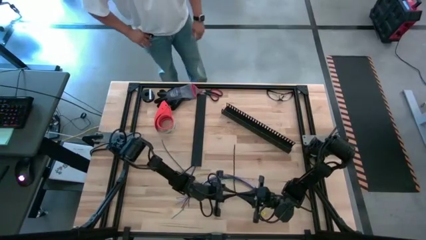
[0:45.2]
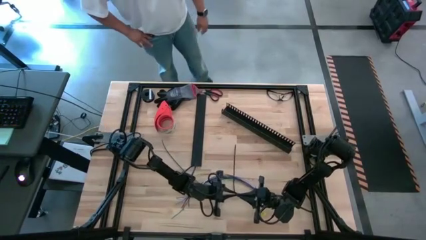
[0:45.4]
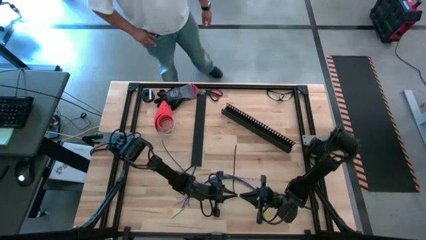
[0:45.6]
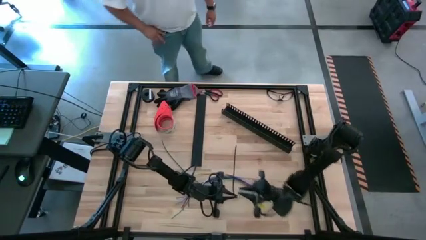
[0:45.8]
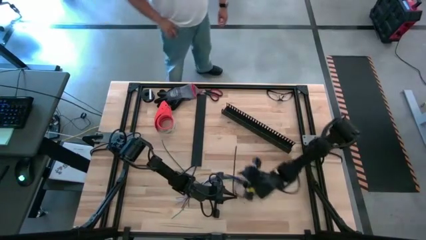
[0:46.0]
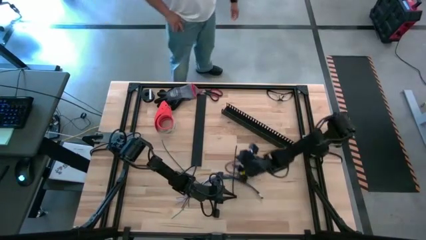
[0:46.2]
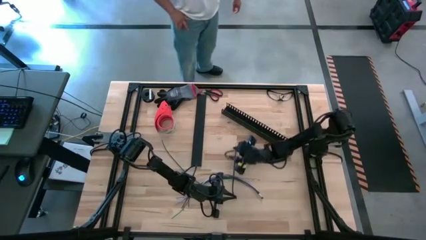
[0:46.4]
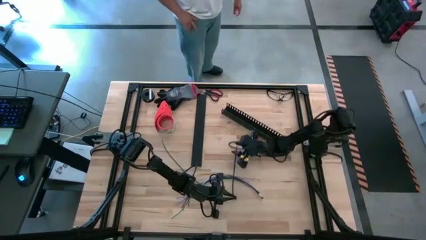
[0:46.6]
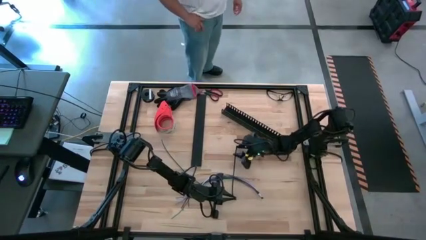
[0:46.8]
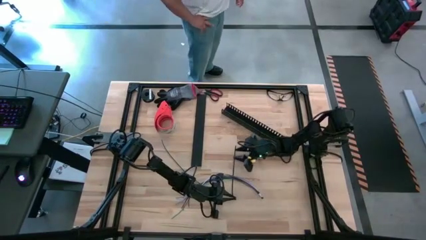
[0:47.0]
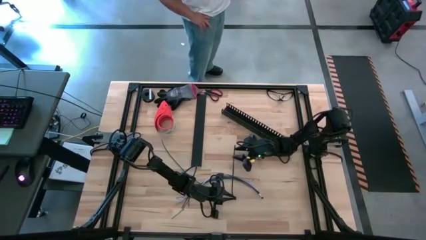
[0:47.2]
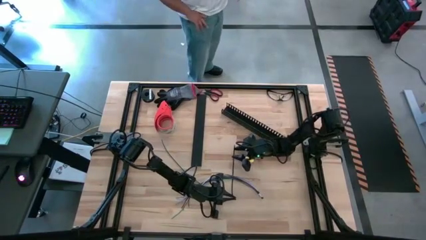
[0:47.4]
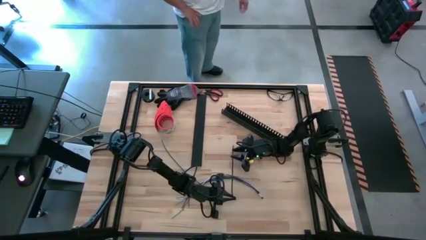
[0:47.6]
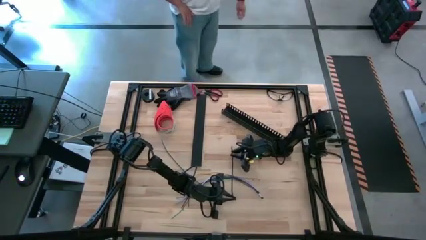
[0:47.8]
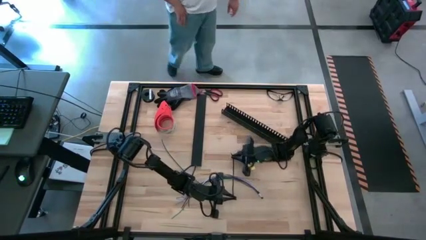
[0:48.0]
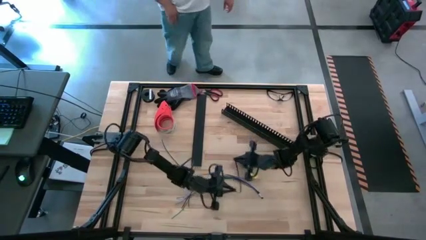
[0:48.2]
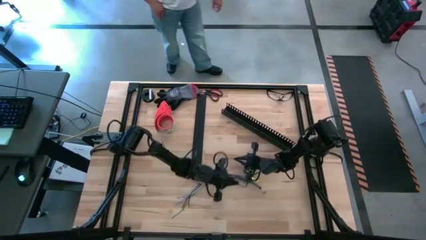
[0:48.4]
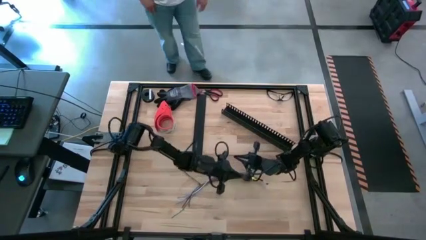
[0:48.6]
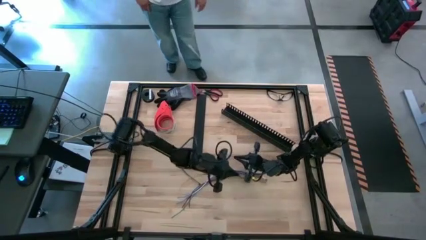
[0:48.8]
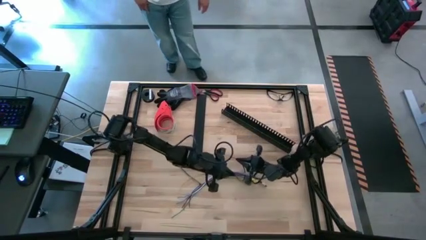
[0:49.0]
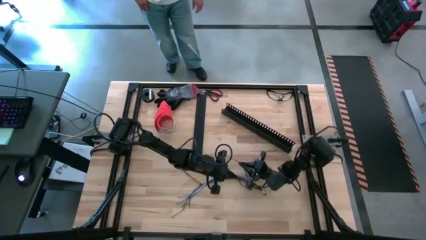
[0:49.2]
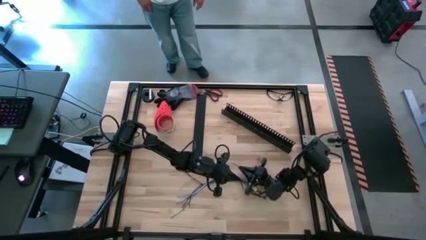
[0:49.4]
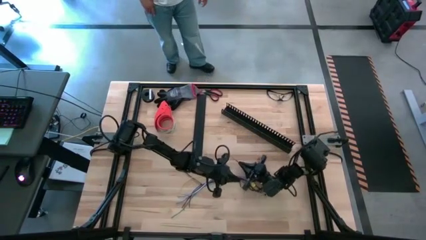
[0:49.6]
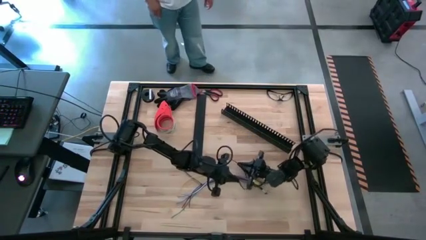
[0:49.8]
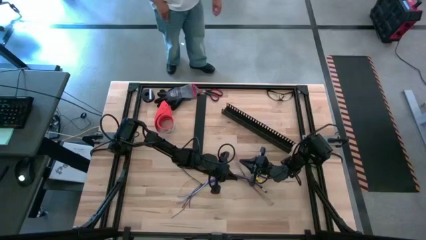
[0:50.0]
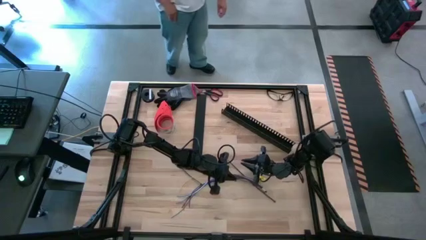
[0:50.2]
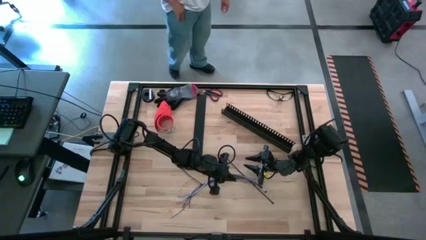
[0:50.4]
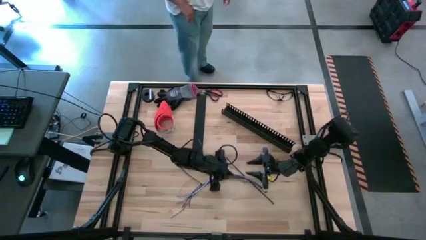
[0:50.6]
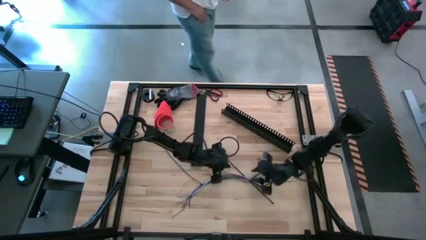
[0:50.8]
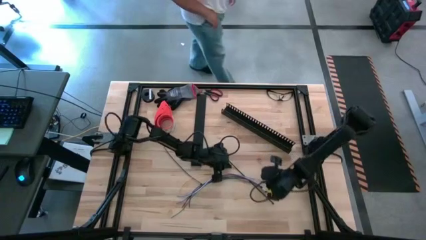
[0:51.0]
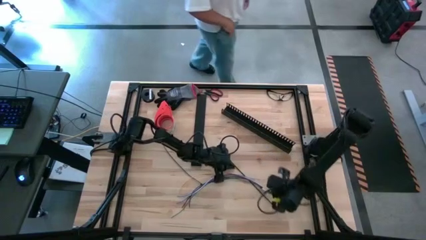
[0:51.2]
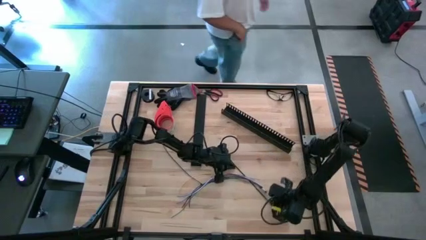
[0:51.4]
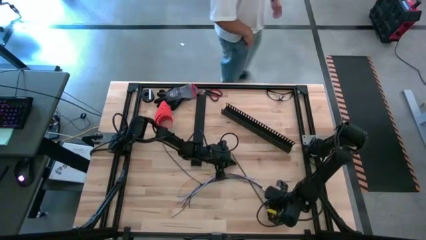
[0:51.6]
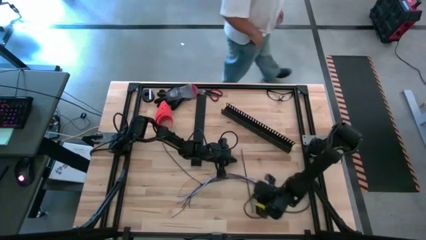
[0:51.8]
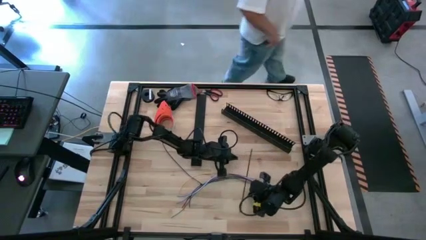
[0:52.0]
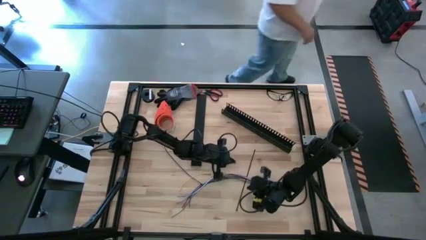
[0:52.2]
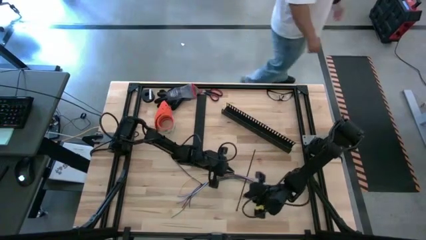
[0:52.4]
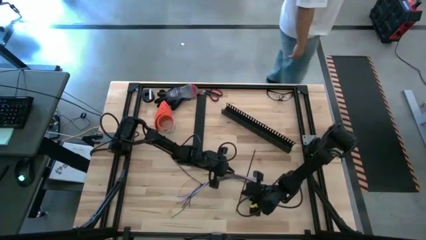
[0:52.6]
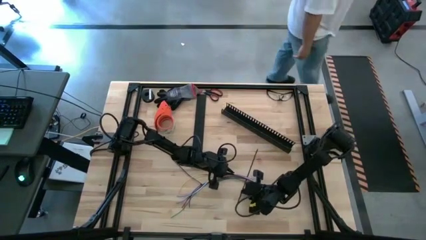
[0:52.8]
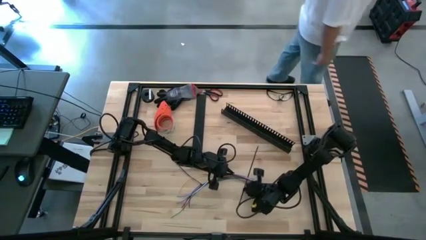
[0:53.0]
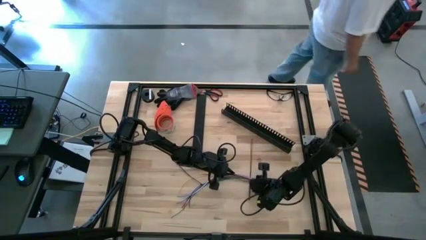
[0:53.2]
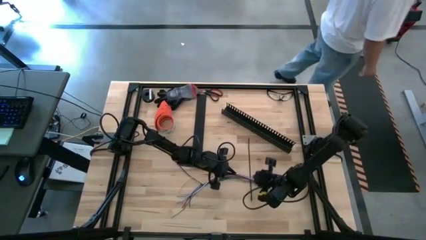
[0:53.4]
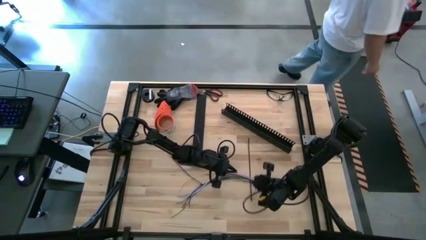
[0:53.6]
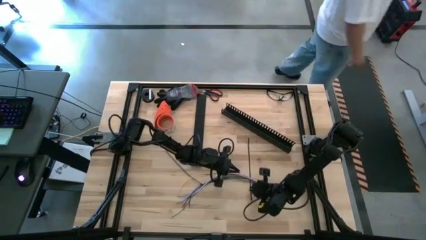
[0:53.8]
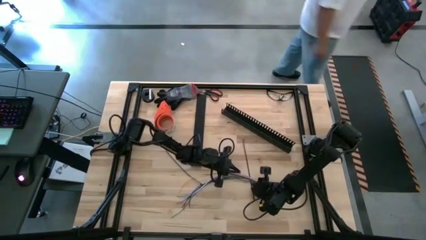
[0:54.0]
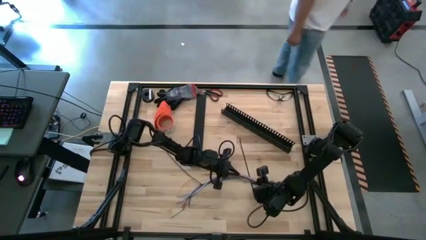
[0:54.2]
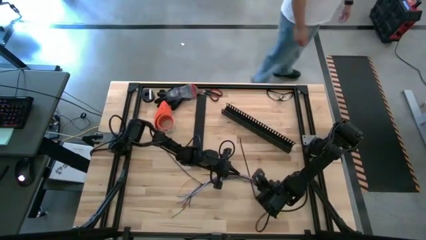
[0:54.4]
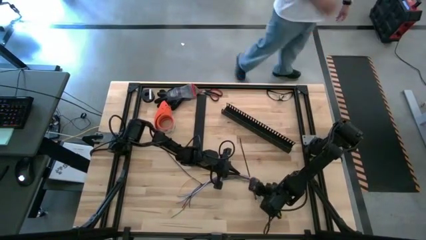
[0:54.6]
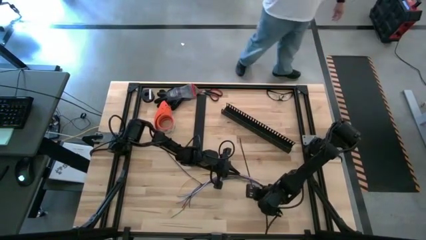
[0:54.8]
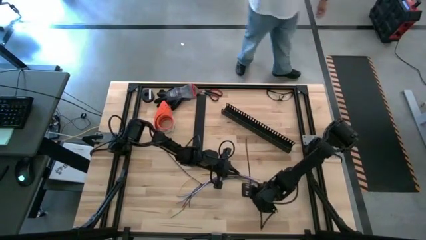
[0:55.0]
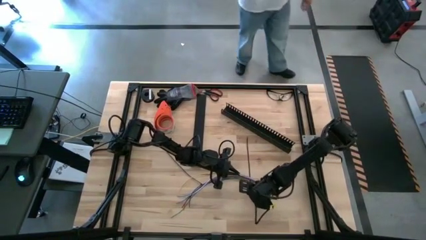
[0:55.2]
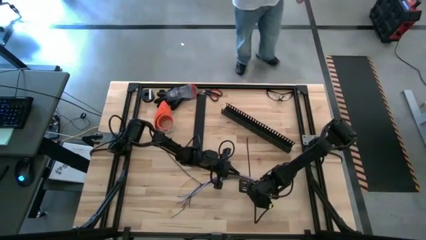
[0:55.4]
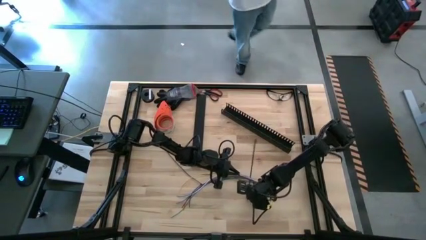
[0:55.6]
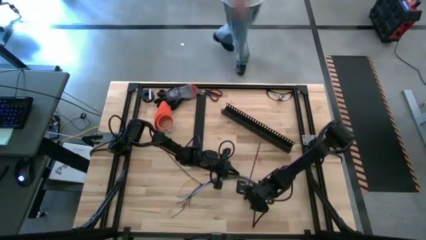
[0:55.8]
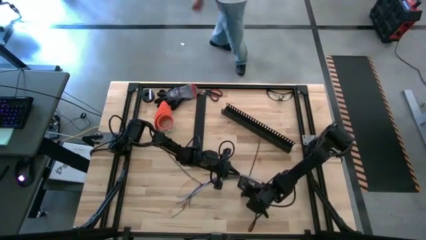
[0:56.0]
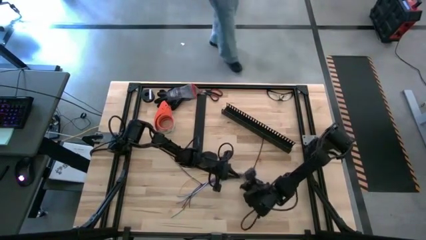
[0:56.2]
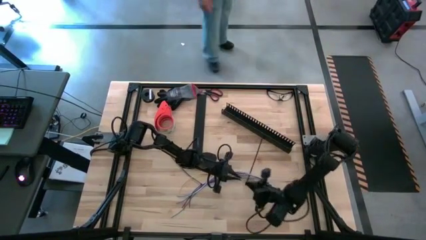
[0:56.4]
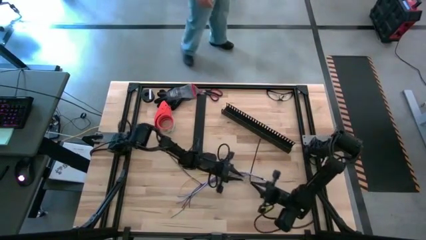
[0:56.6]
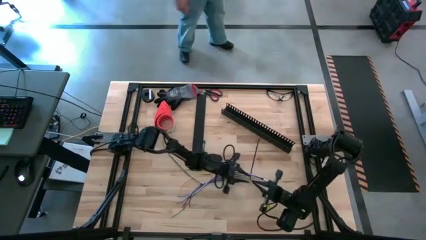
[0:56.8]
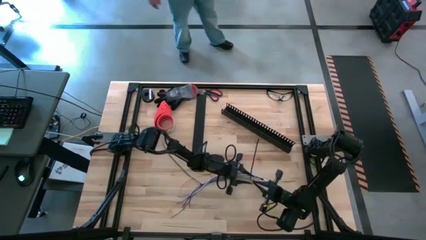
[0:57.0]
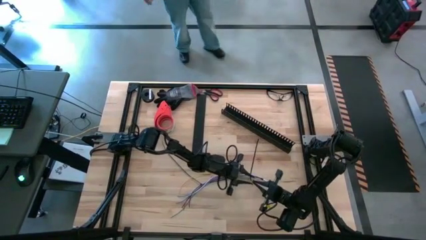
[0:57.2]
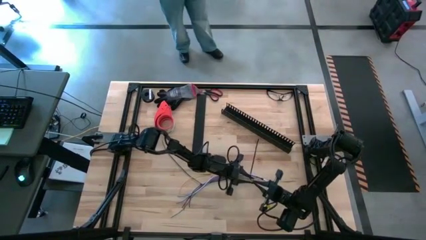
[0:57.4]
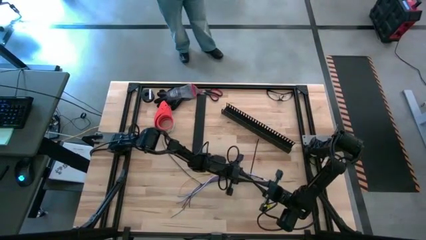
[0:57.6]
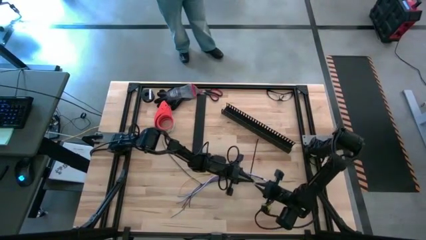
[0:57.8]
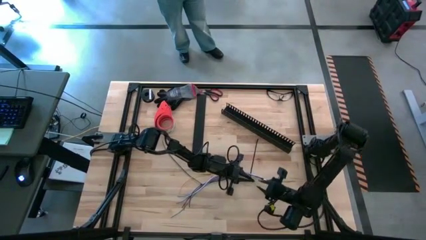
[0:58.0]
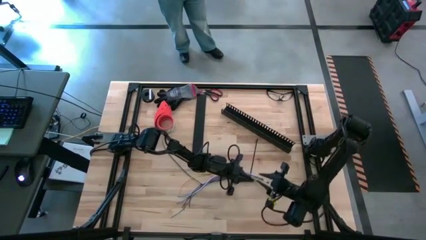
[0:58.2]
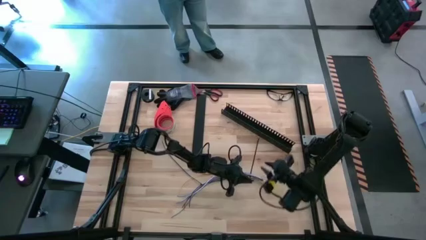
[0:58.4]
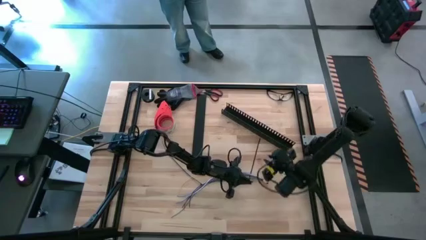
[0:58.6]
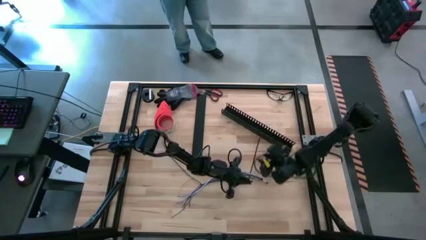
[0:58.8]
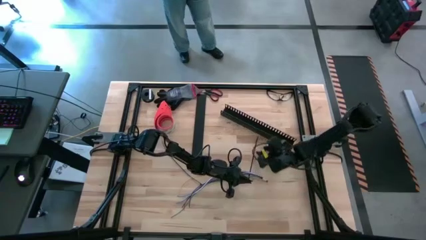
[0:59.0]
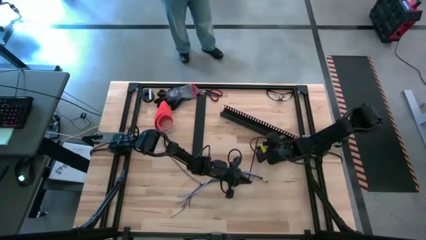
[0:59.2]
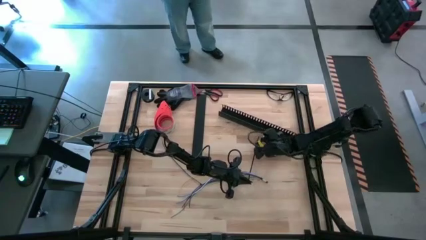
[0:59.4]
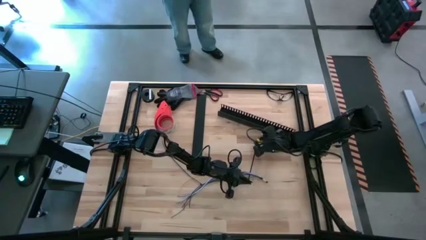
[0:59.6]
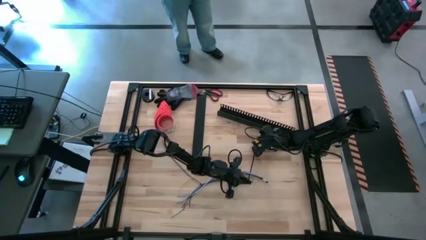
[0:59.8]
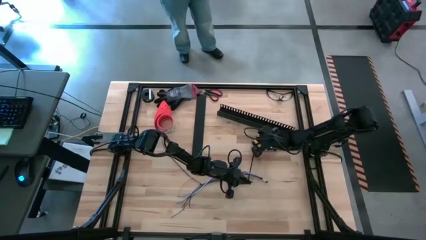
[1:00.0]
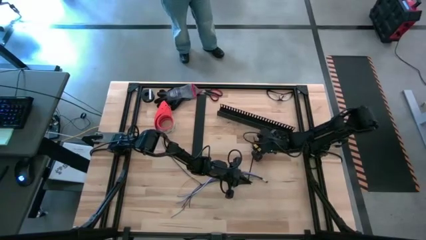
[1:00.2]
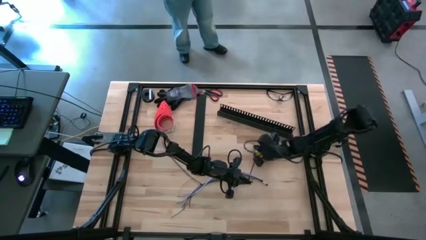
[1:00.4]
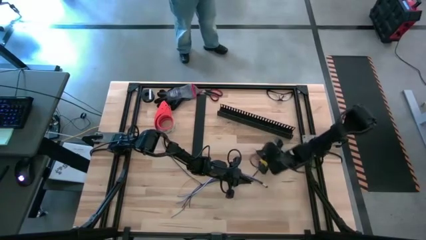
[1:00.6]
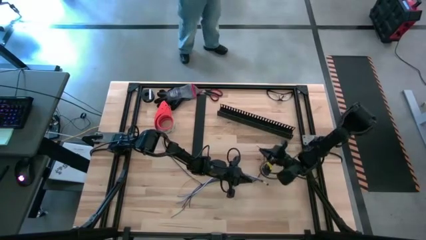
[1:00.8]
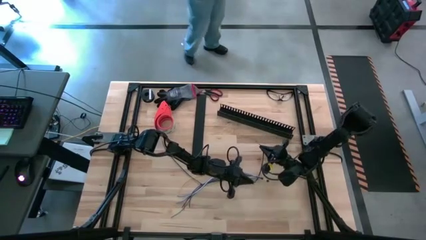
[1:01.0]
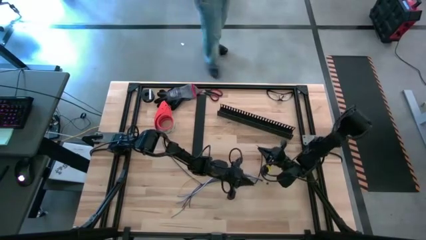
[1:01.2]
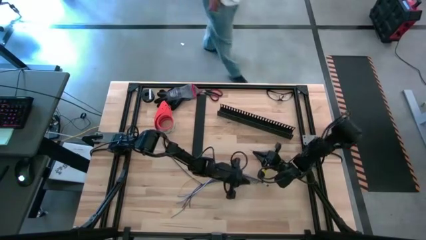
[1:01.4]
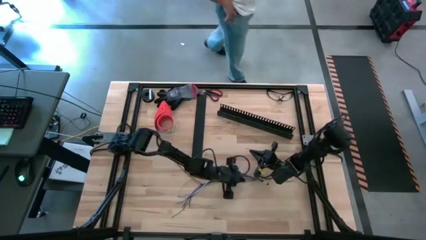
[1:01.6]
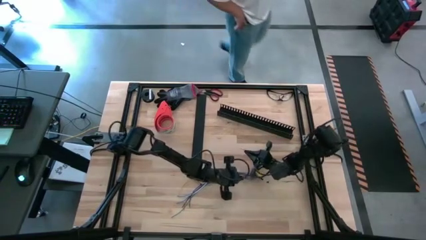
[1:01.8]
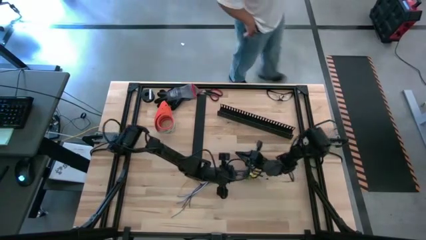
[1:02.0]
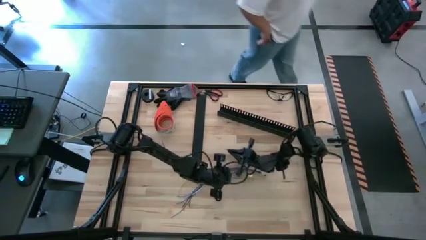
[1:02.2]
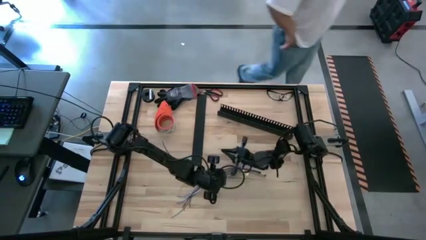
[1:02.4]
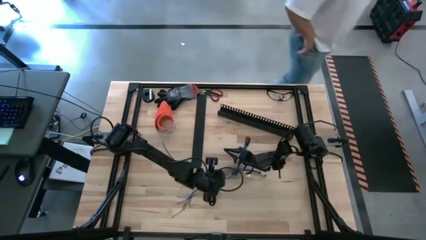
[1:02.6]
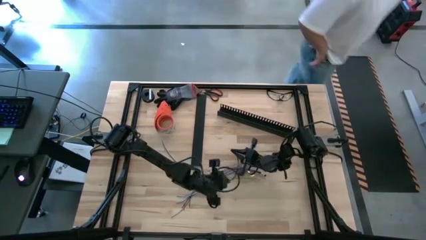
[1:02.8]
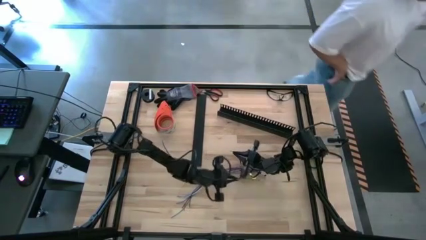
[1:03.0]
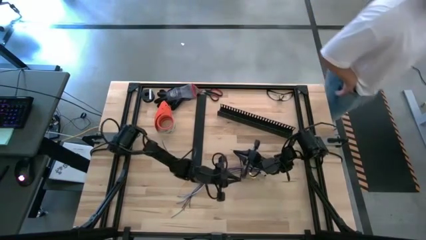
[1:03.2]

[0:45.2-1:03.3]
Task: Ziptie cables
Wrap the black zip tie on the cables
